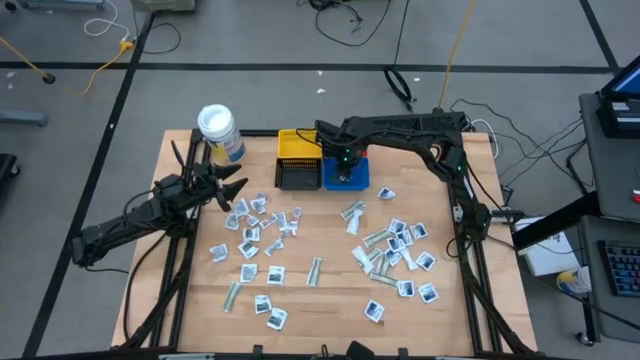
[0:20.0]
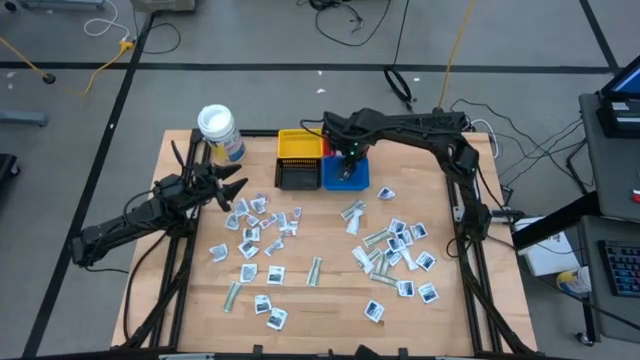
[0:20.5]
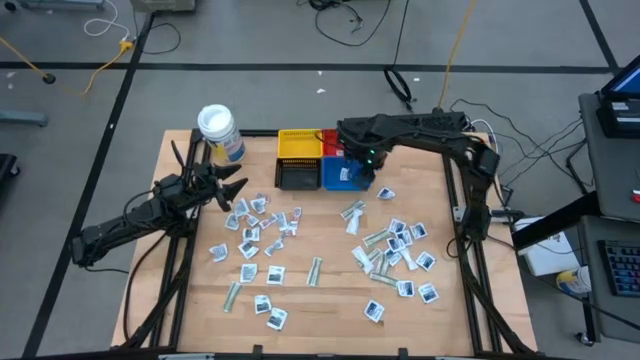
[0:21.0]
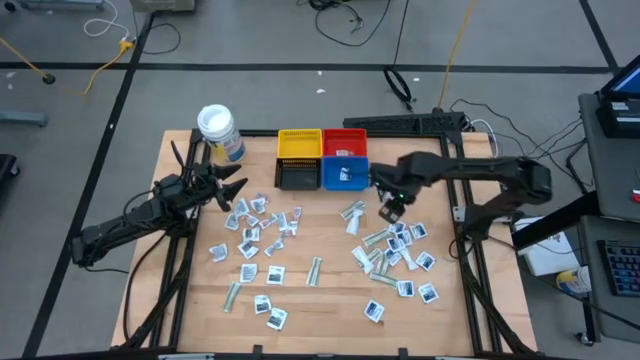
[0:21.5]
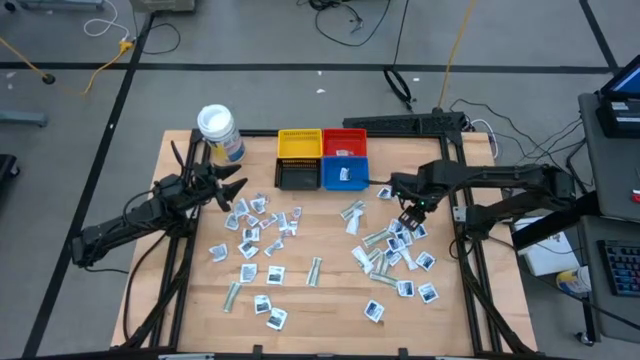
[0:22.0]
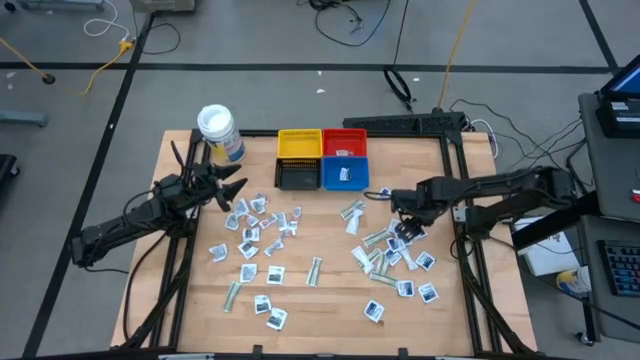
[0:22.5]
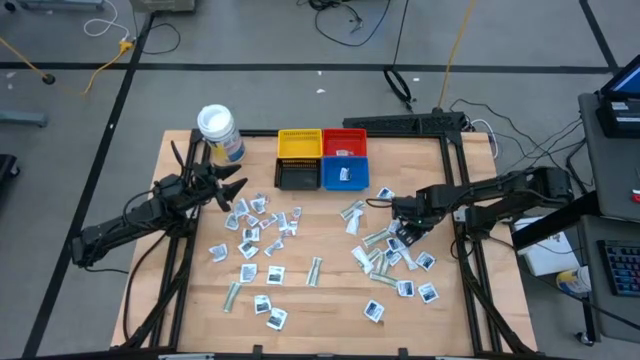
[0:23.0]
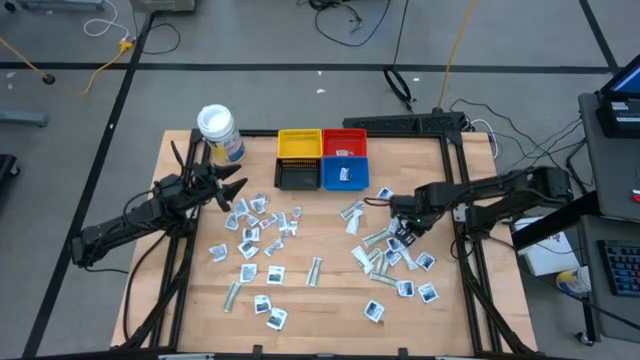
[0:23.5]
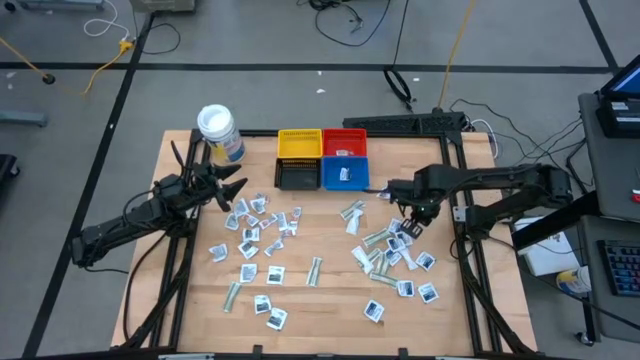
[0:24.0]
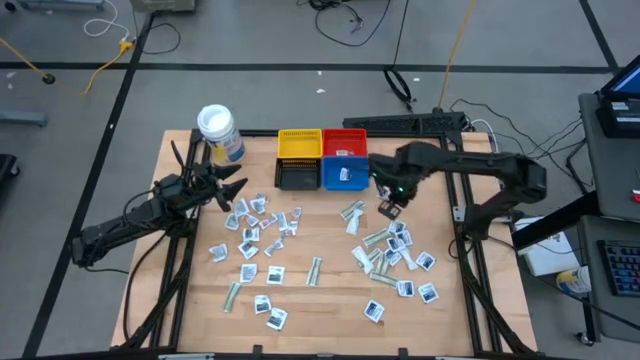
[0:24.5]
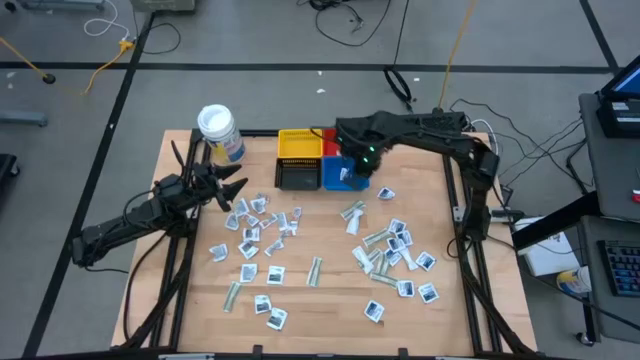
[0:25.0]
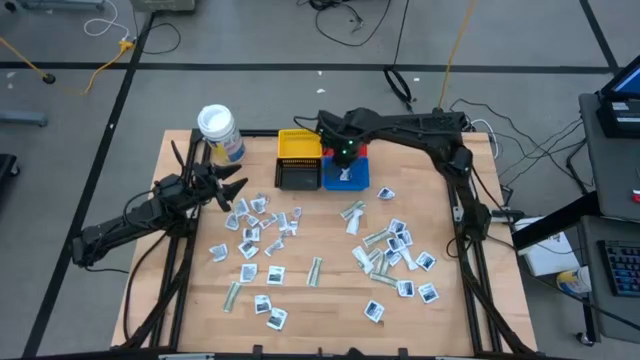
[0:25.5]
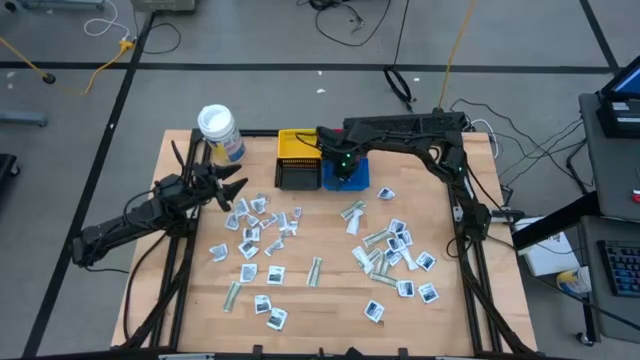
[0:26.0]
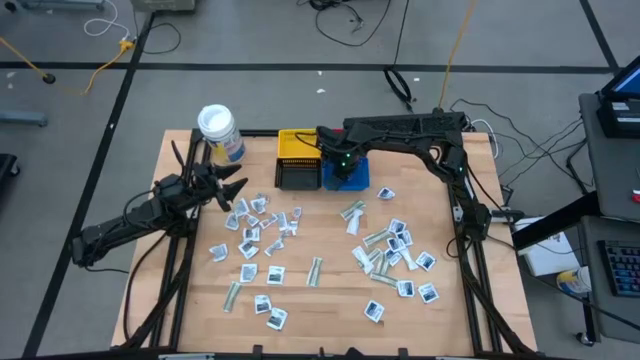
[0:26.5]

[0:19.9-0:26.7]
Task: Pick & Place First Aid Supplies
Put the blue alcohol pad into the blue basket

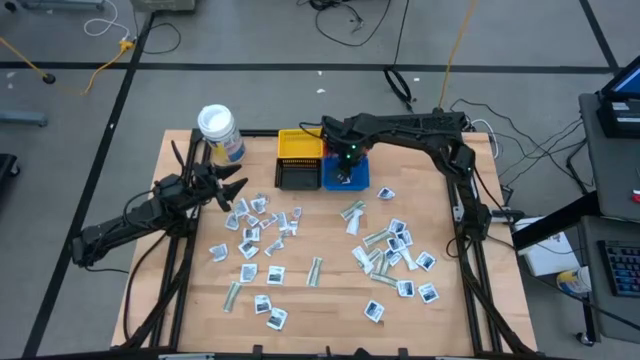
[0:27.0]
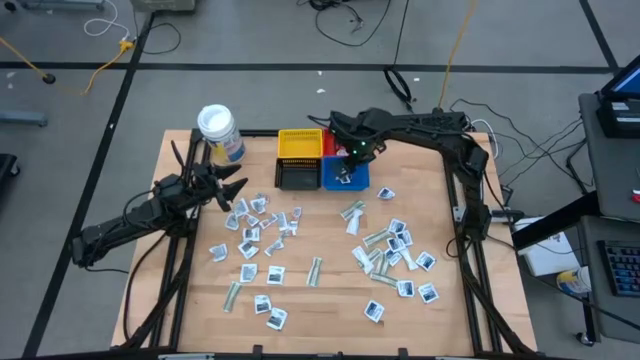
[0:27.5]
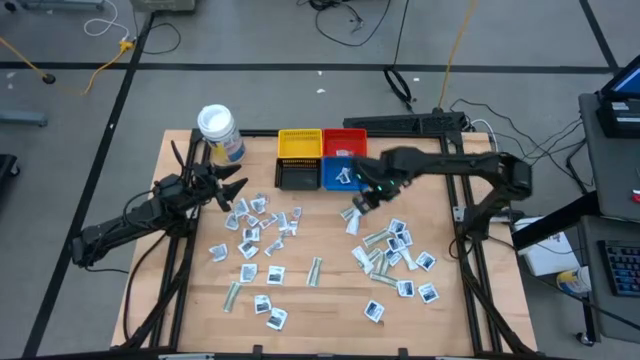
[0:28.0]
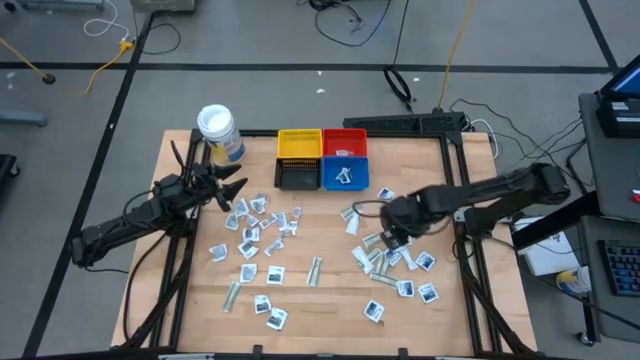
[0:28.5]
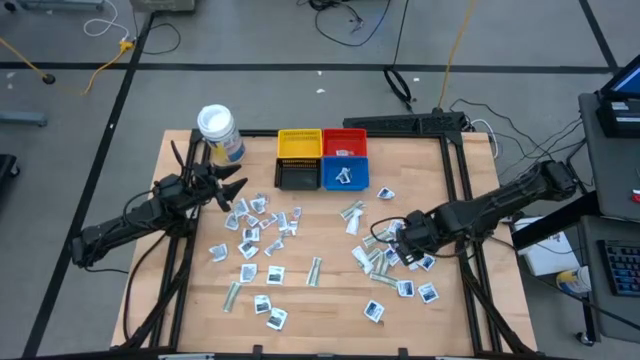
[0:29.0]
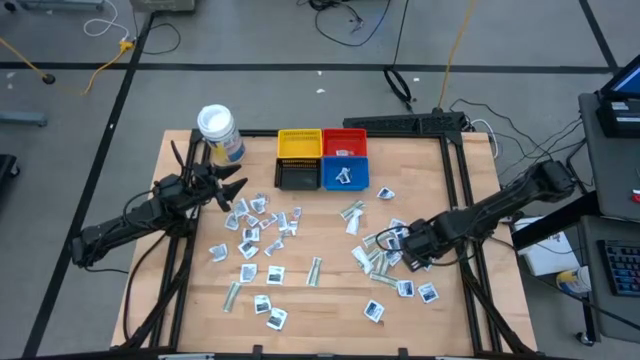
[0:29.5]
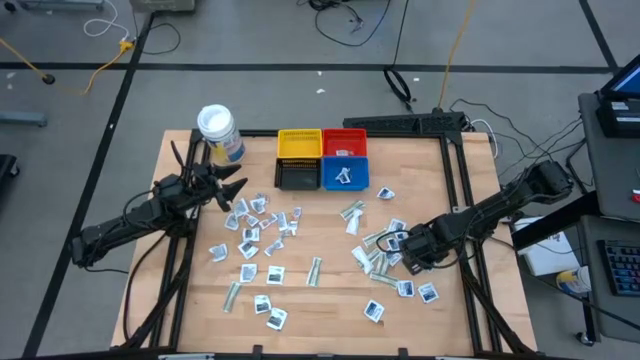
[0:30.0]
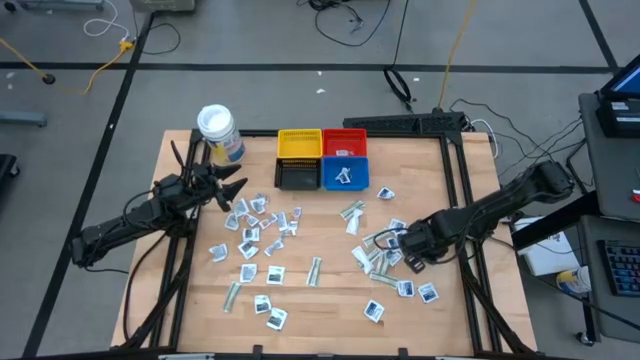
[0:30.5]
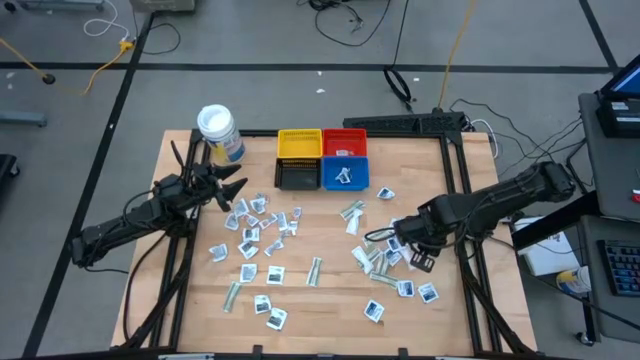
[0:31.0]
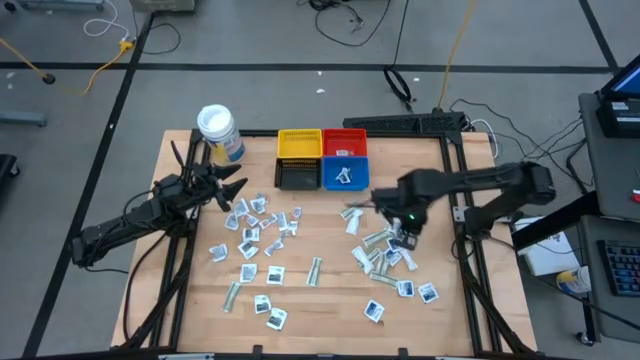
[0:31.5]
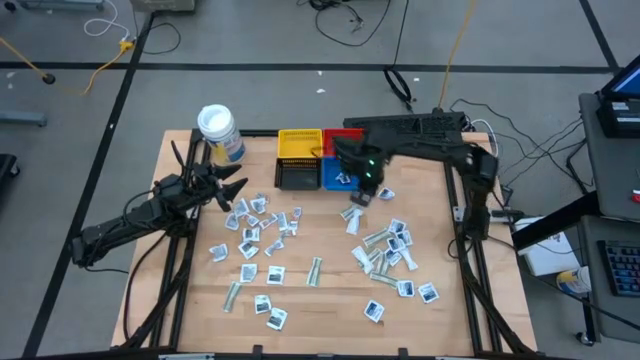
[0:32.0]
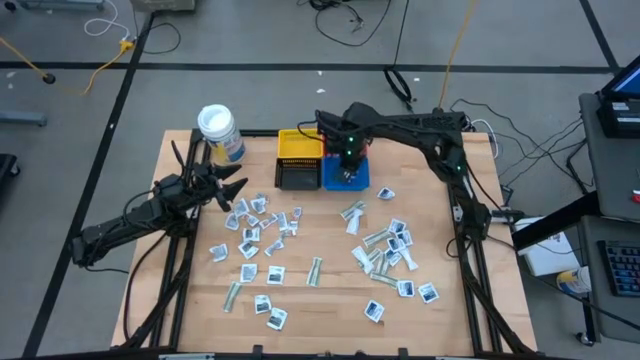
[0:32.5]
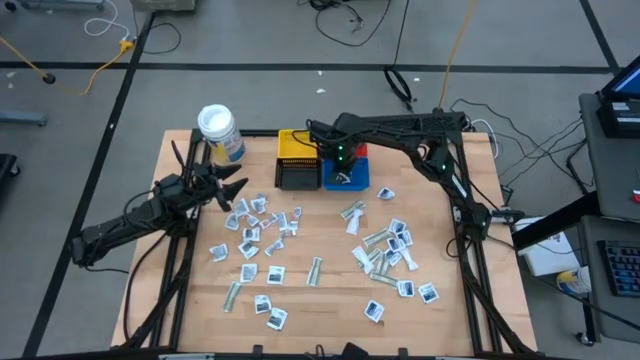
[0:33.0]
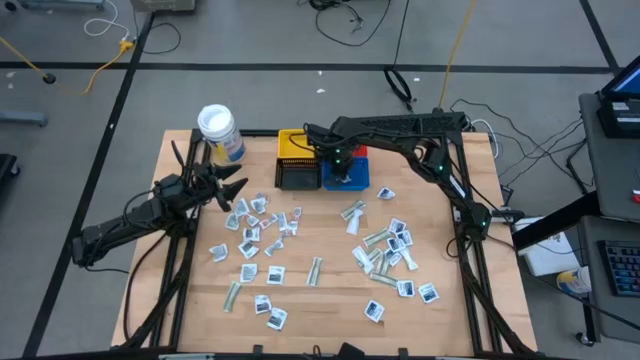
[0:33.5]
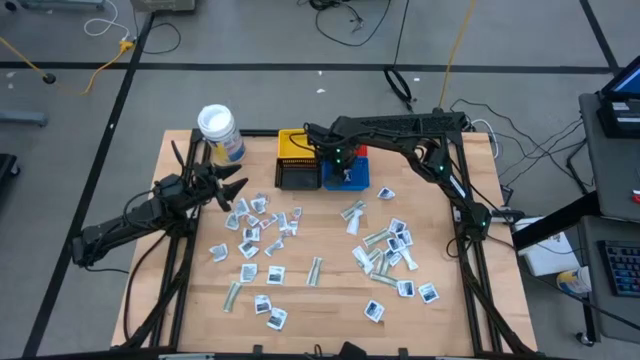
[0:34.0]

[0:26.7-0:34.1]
Put the blue alcohol pad into the blue basket

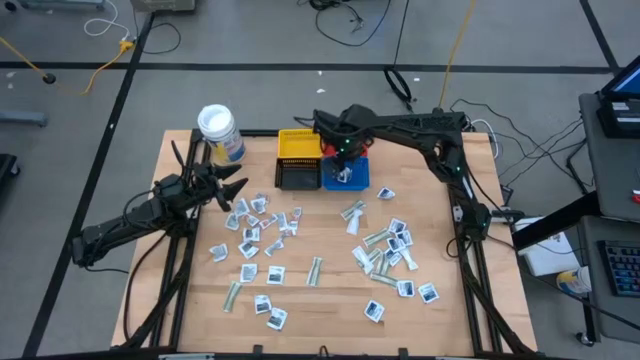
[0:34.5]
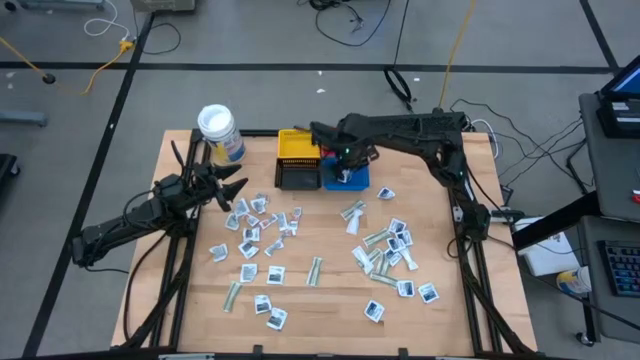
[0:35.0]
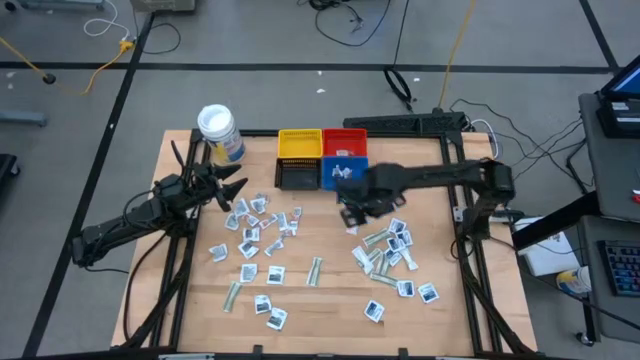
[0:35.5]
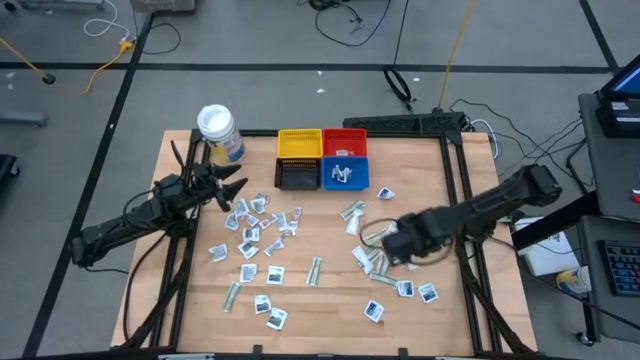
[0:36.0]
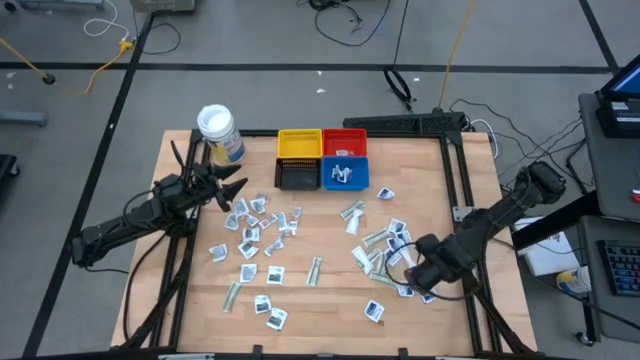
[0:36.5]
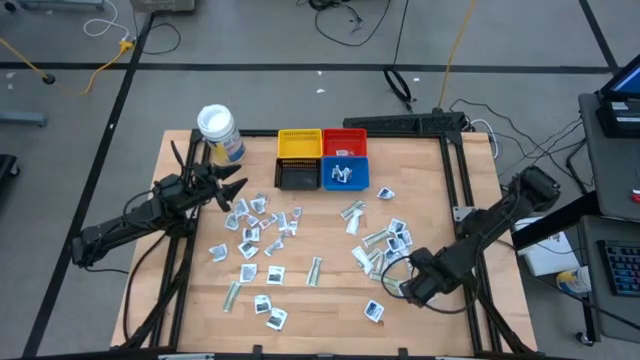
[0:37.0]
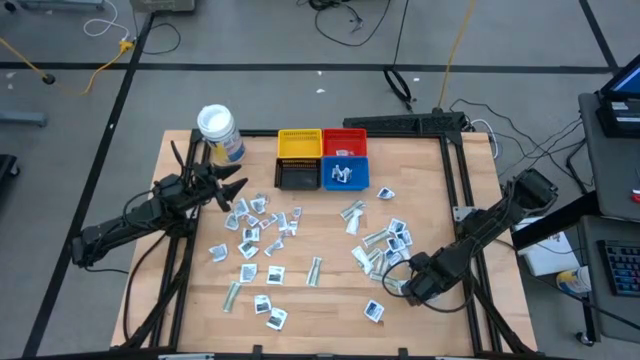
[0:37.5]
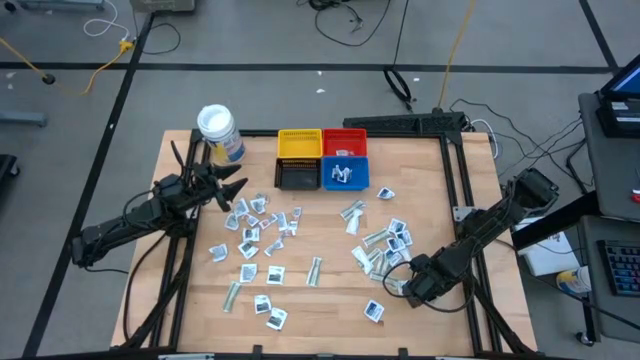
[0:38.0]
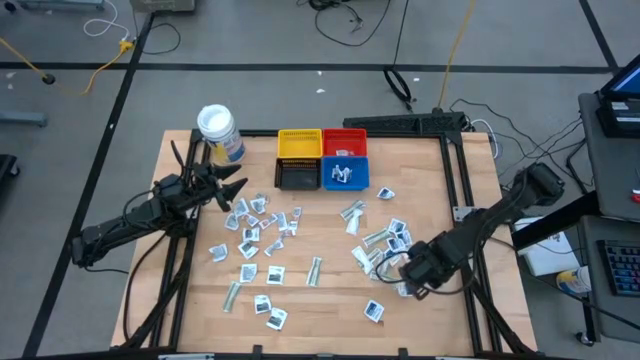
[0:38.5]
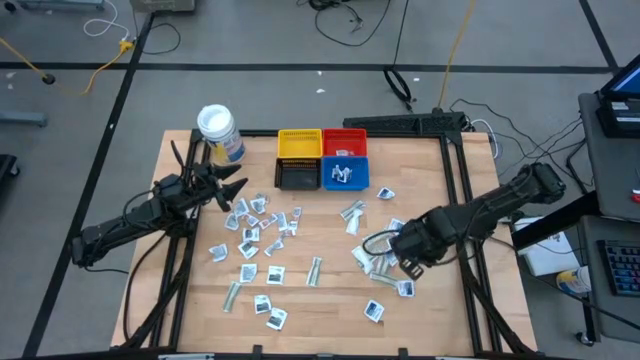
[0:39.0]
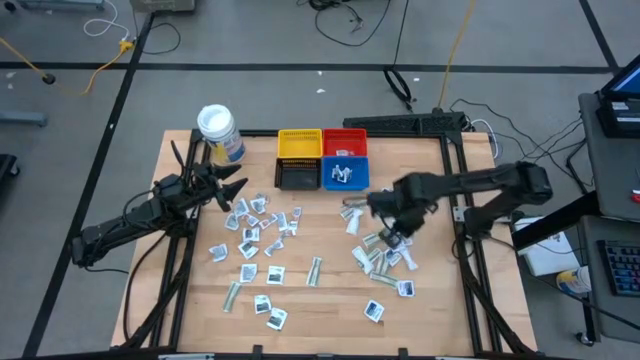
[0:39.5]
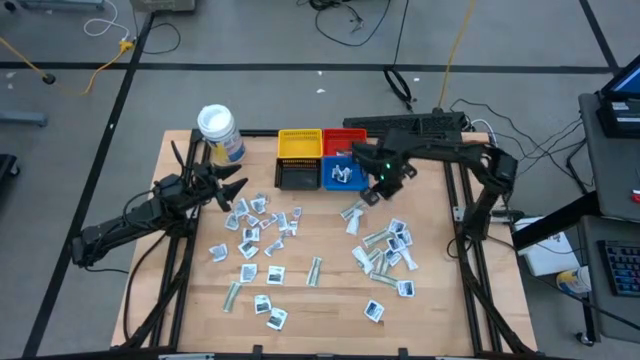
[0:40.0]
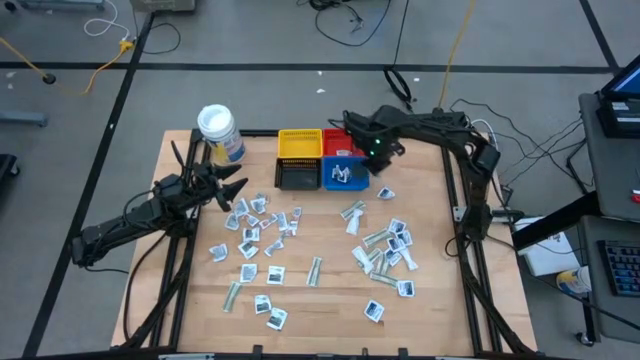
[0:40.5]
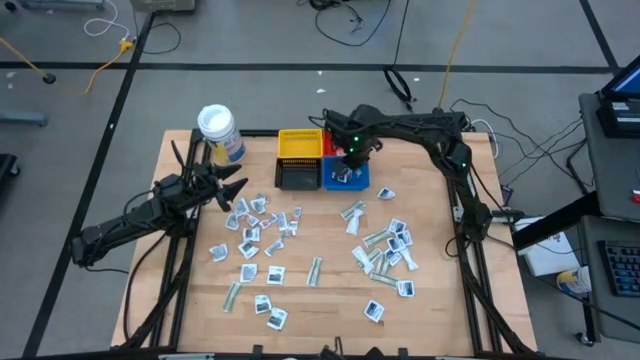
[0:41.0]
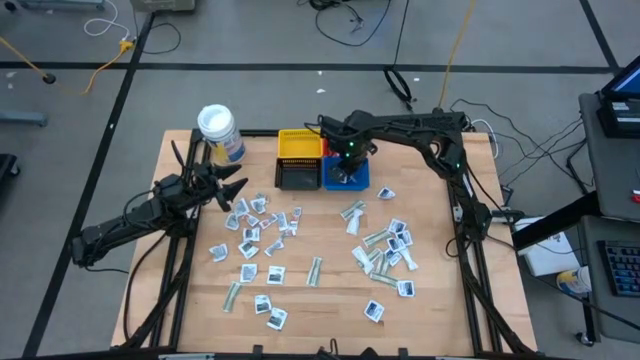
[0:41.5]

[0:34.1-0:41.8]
Put the blue alcohol pad into the blue basket
